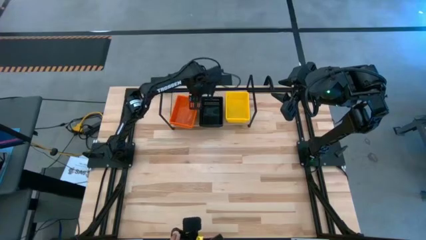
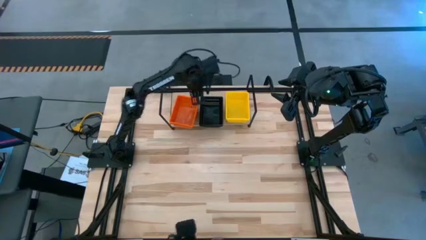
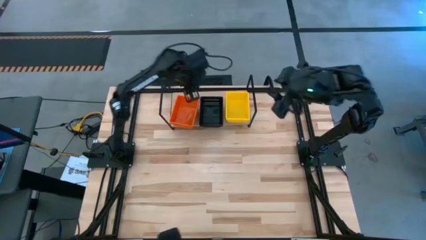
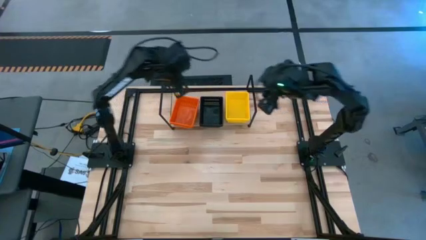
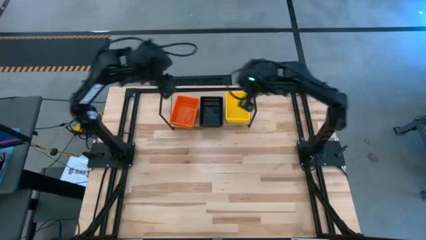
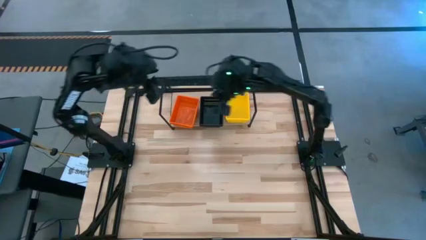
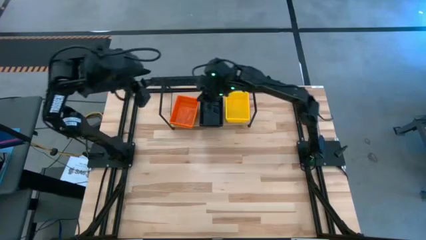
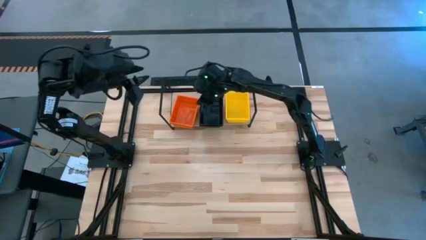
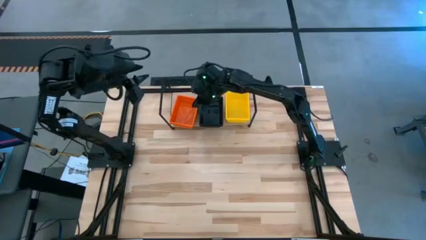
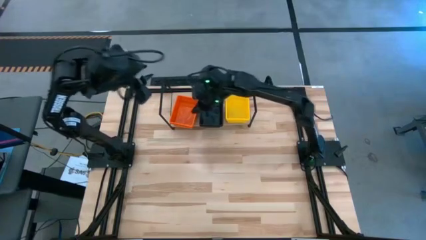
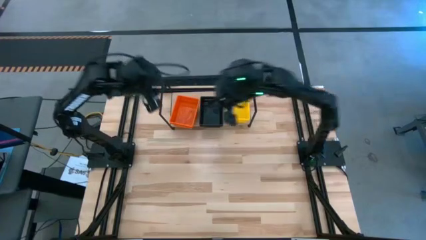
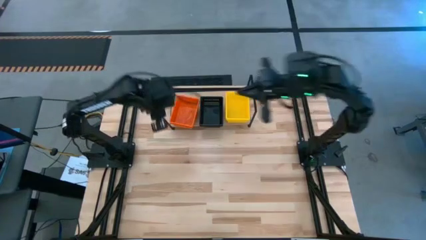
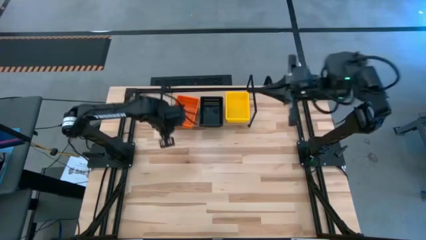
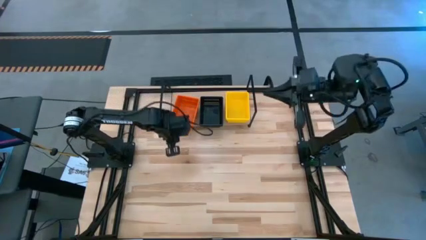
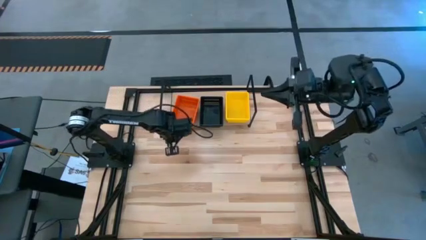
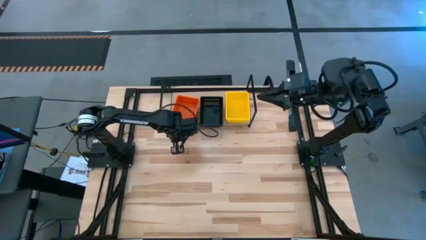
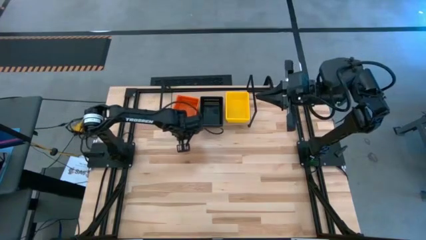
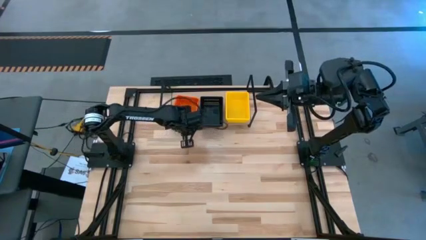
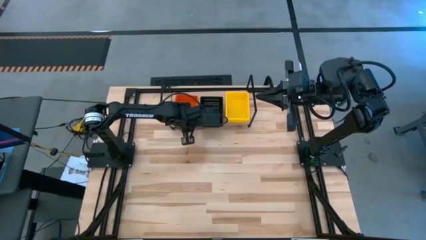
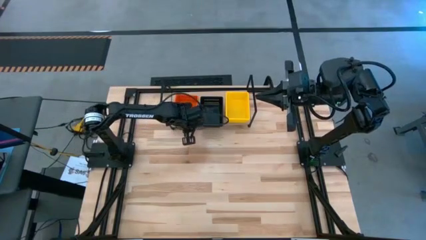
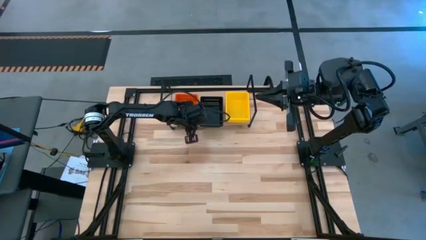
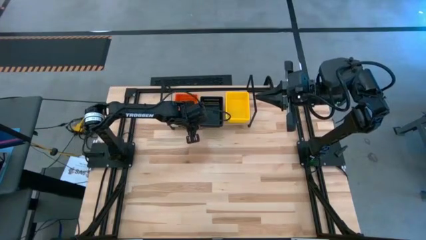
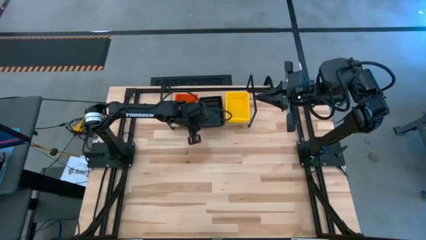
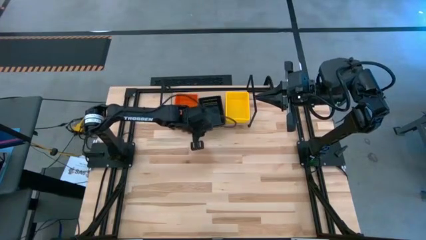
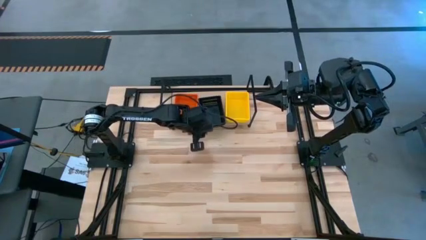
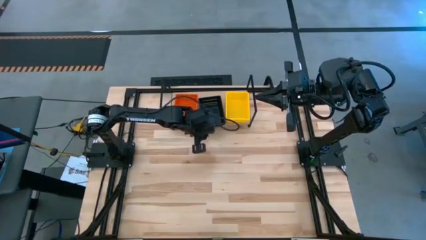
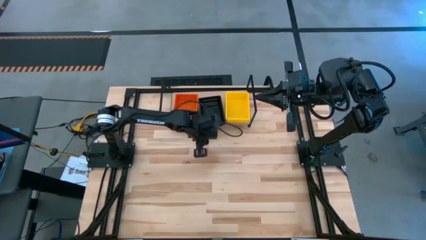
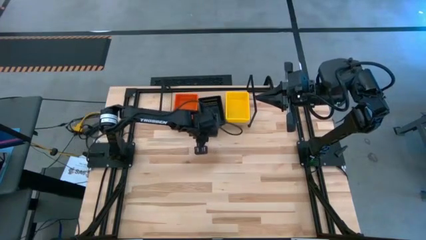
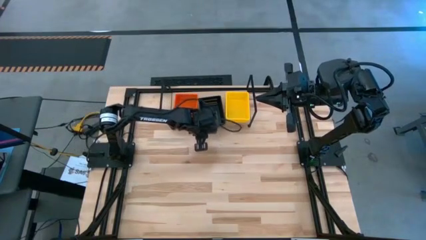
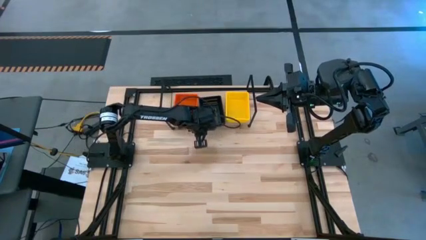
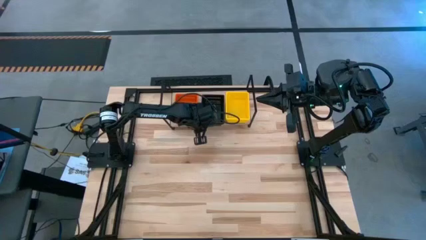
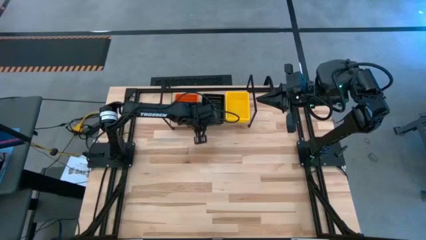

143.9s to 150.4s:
Task: Stack baskets on shelf by color
Adjust the black baskets on the shelf

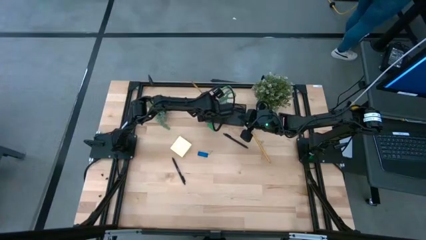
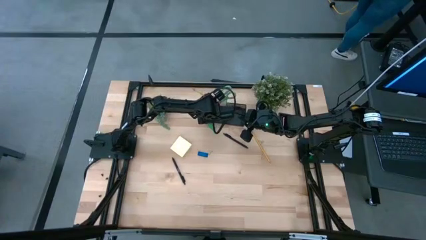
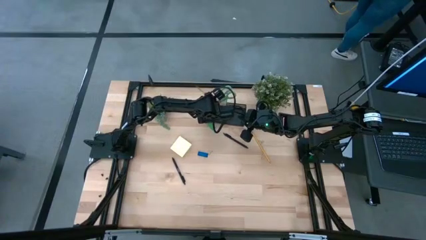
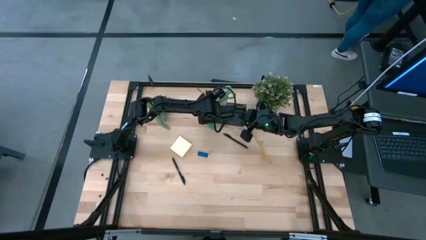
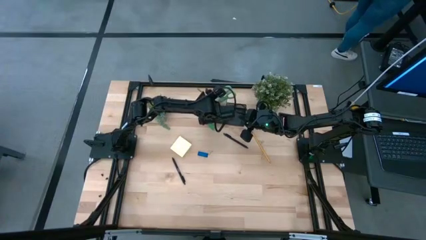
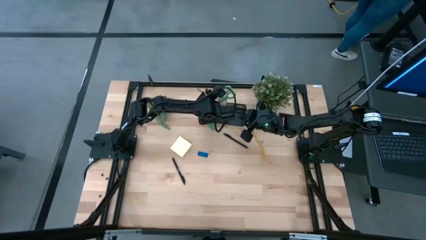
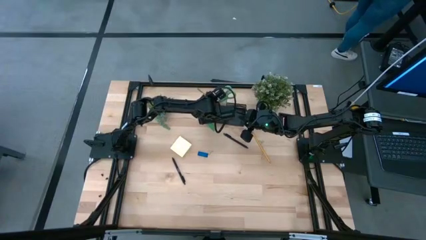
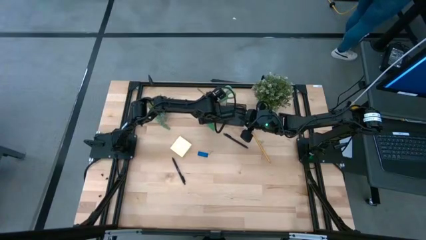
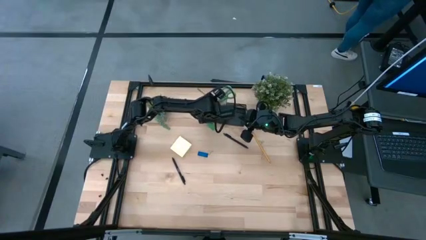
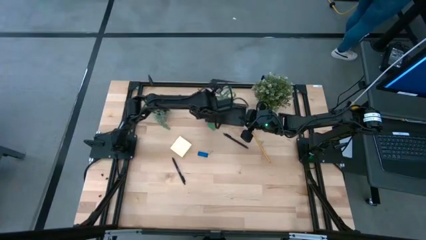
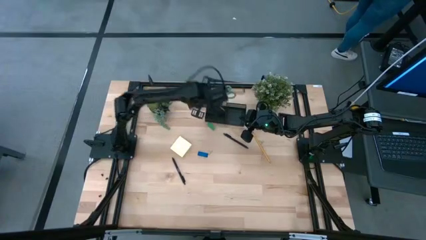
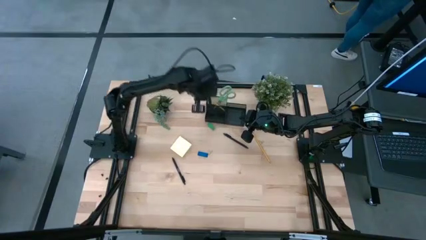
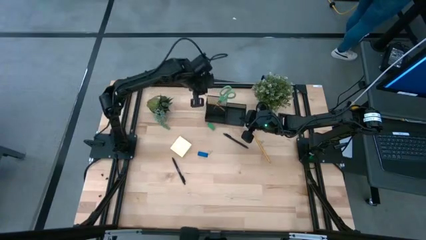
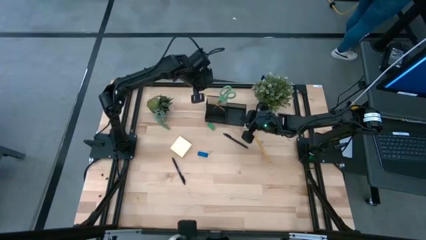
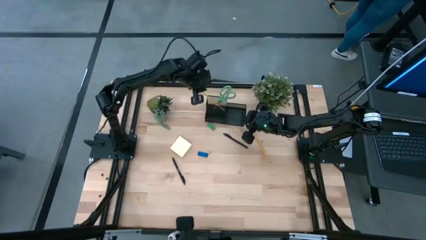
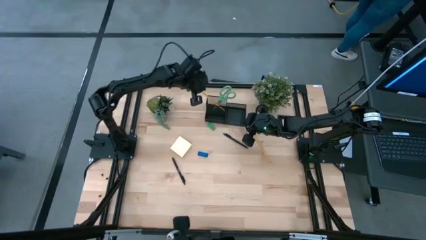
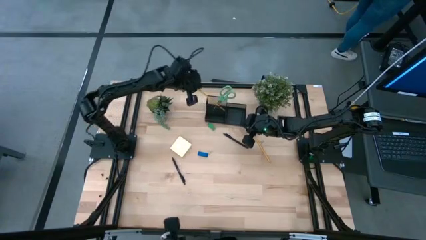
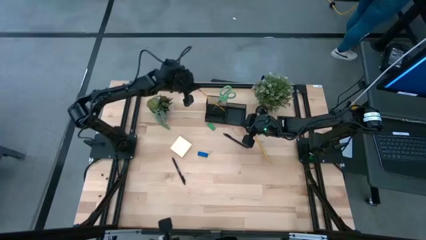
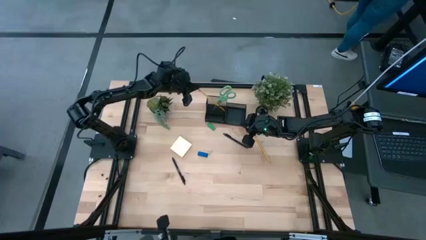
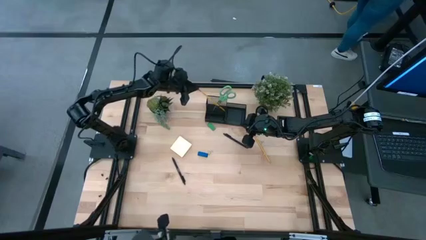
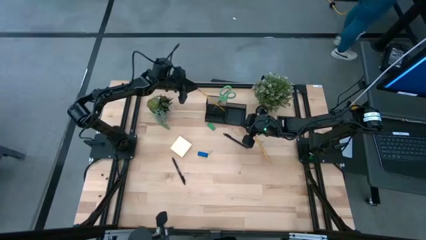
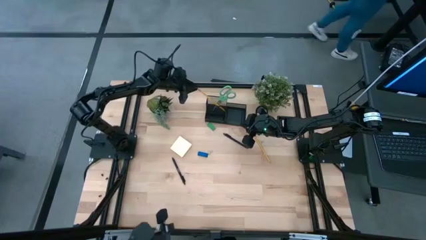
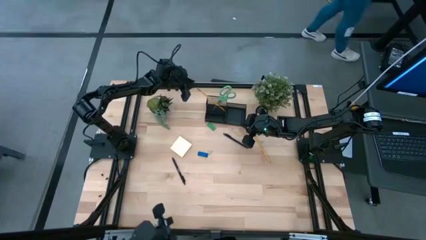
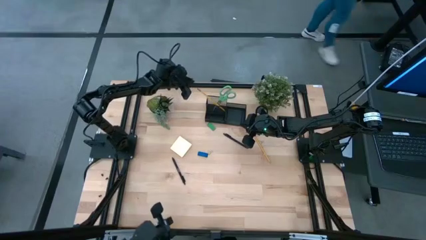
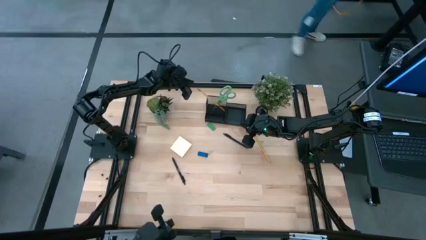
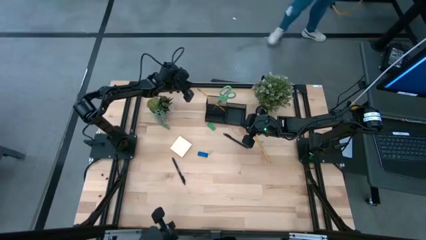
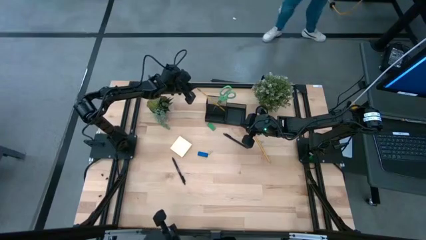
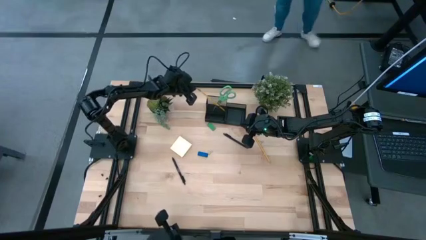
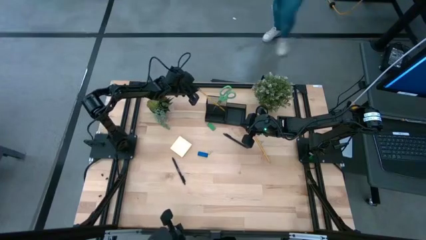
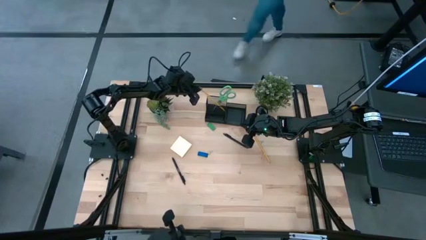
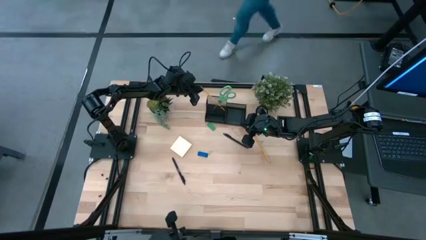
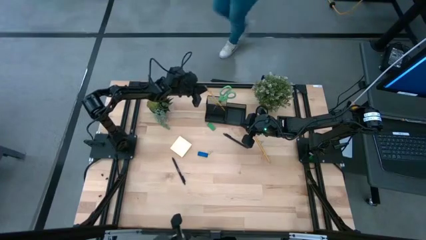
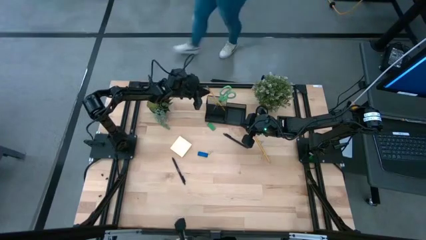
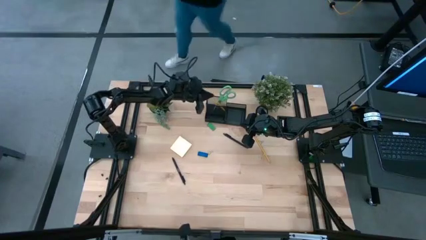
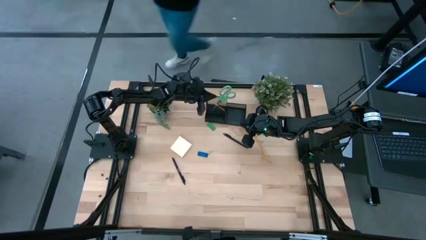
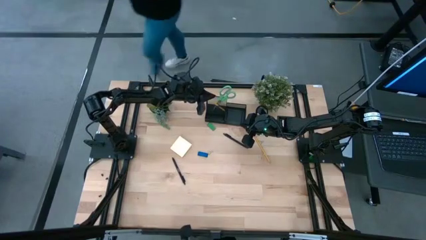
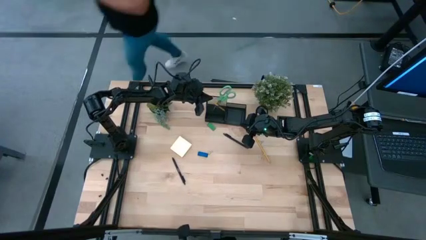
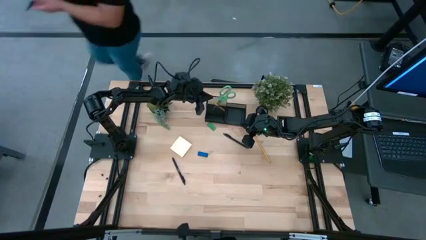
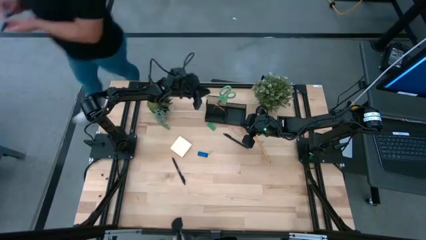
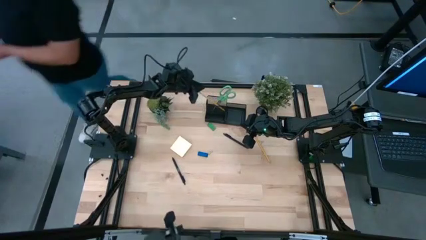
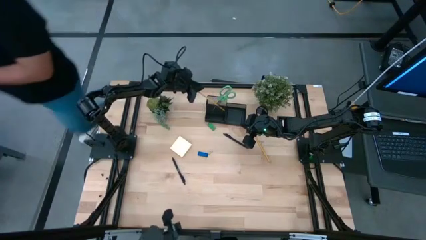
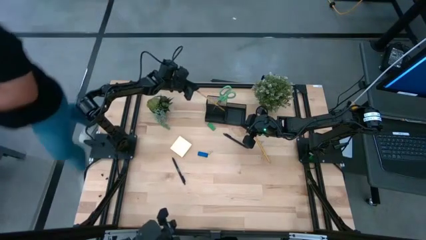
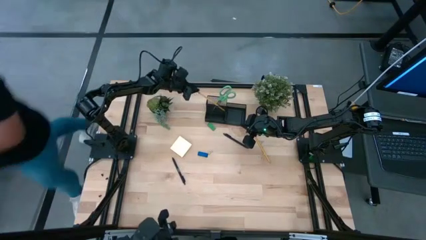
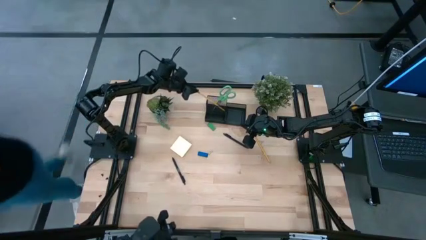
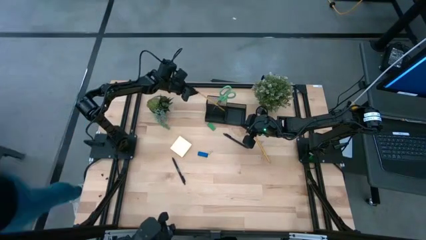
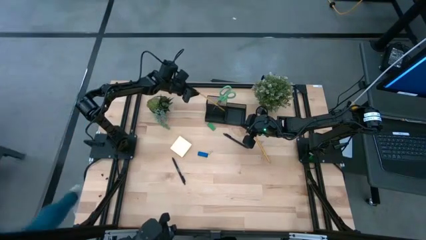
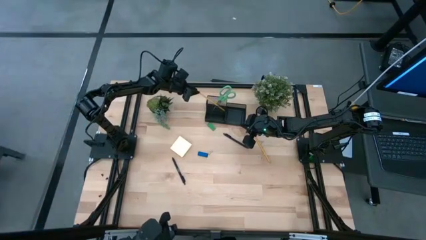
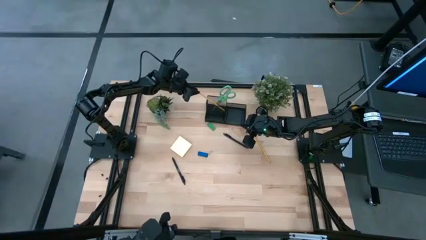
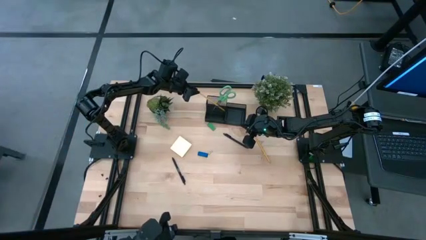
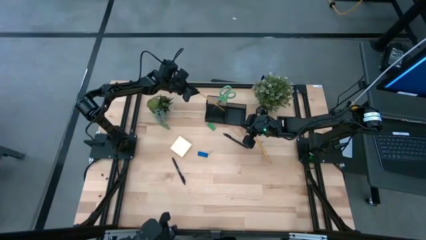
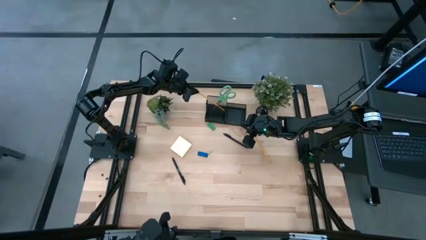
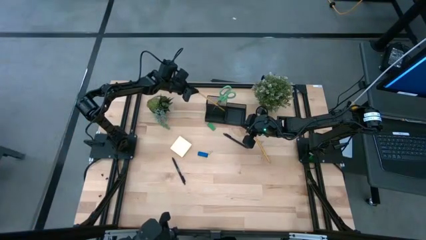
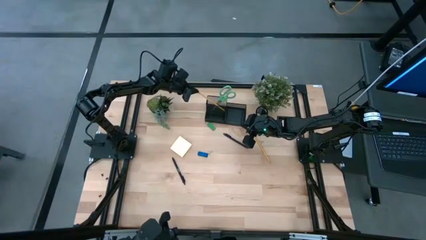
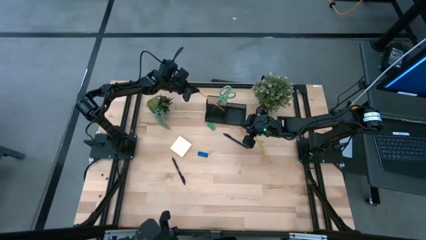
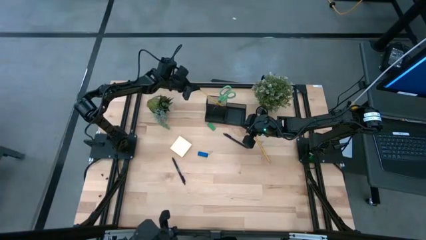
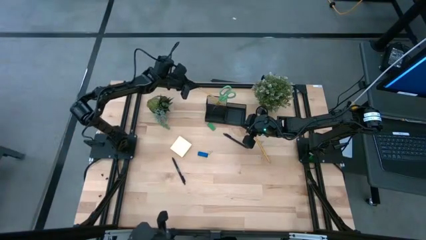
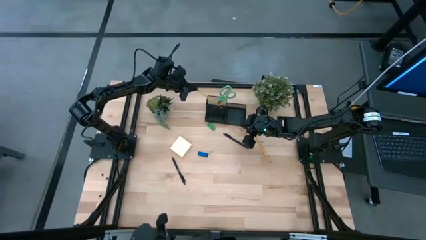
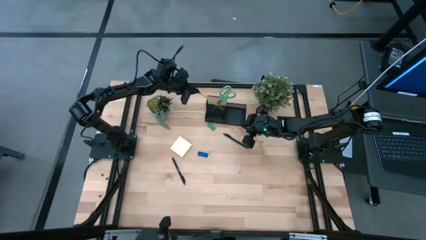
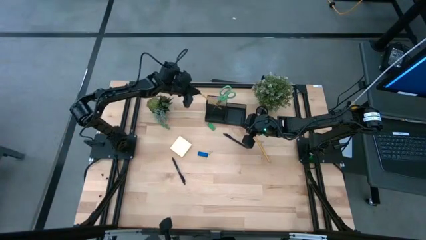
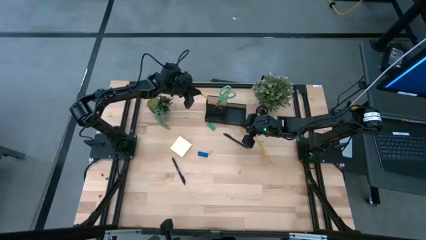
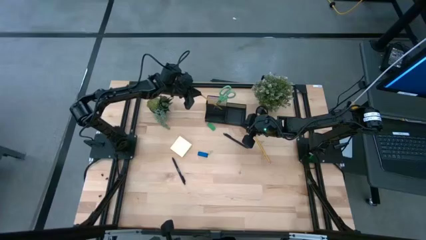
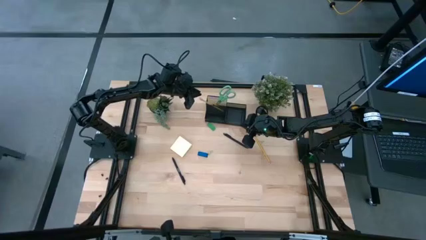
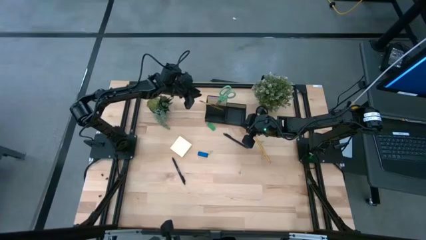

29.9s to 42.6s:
Task: Pick and place office supplies into organizer
Put the left yellow pencil into the black desk organizer
